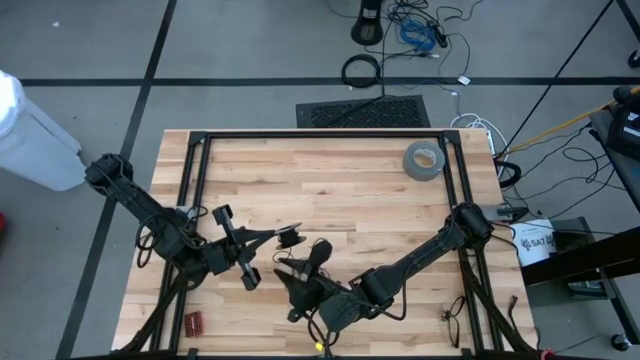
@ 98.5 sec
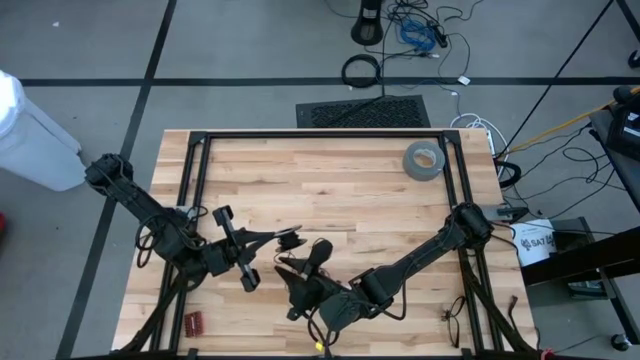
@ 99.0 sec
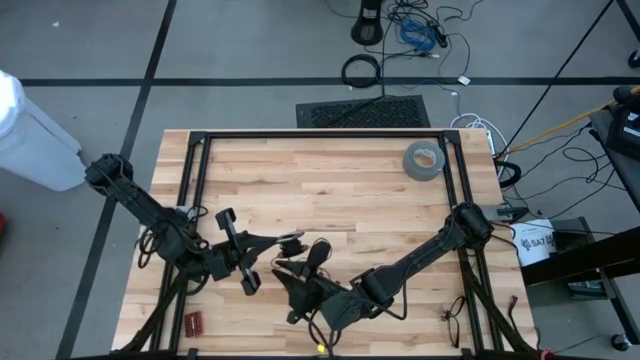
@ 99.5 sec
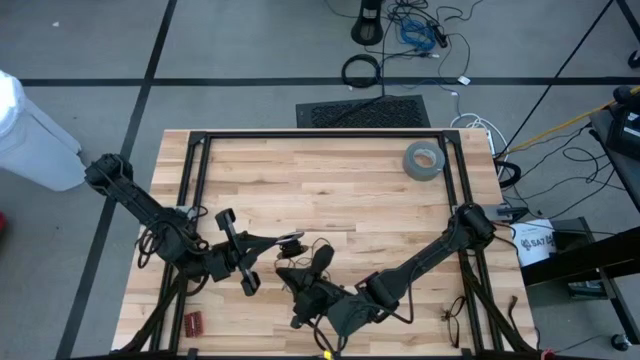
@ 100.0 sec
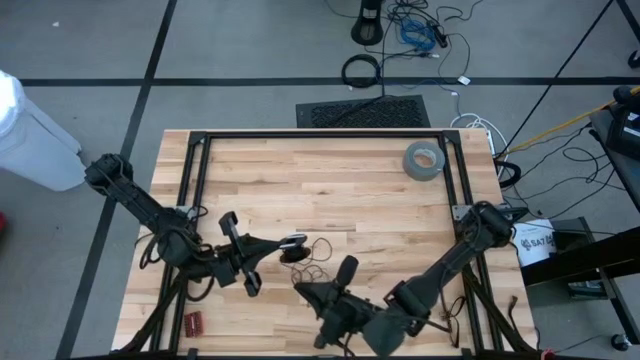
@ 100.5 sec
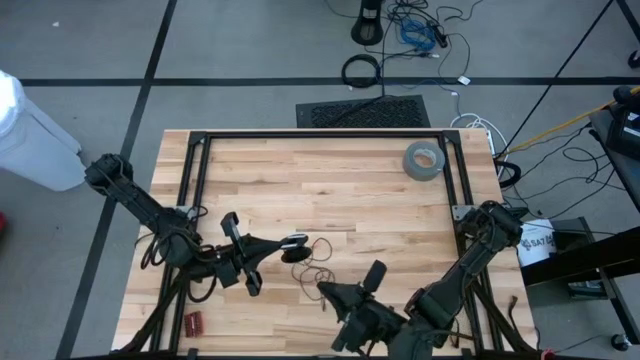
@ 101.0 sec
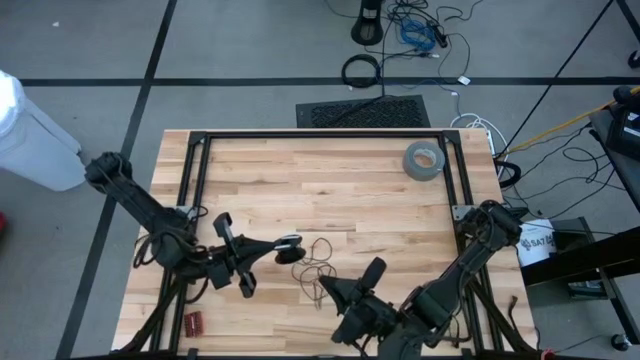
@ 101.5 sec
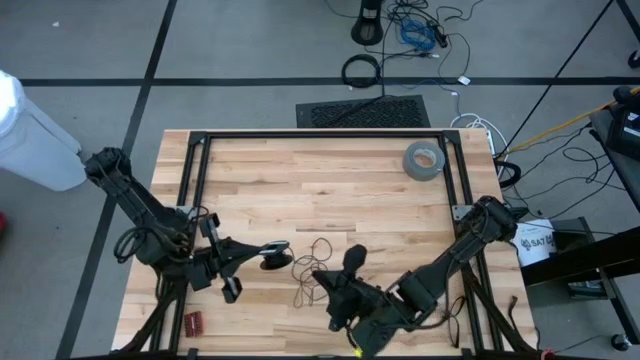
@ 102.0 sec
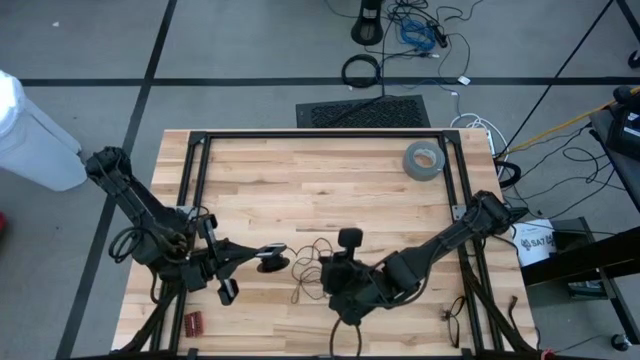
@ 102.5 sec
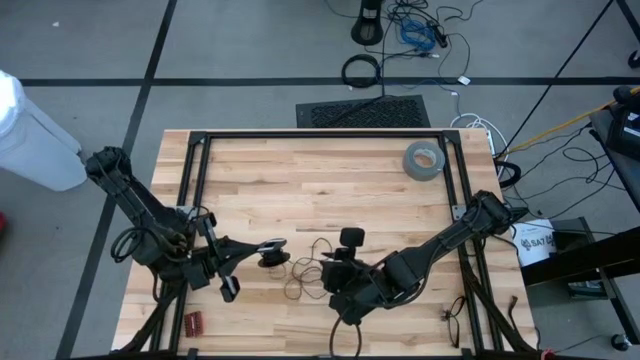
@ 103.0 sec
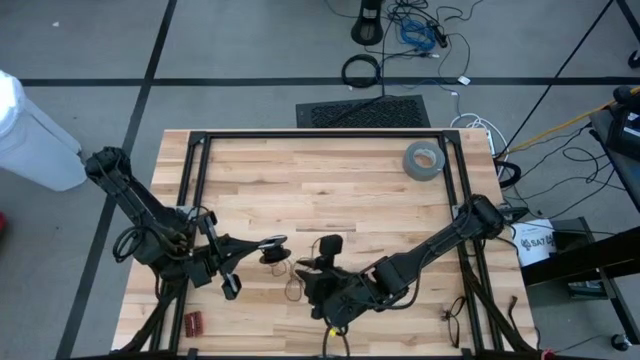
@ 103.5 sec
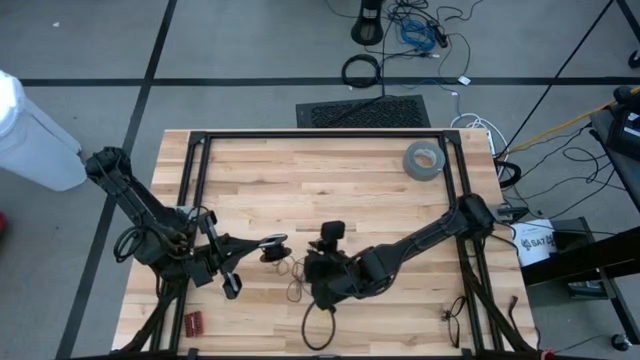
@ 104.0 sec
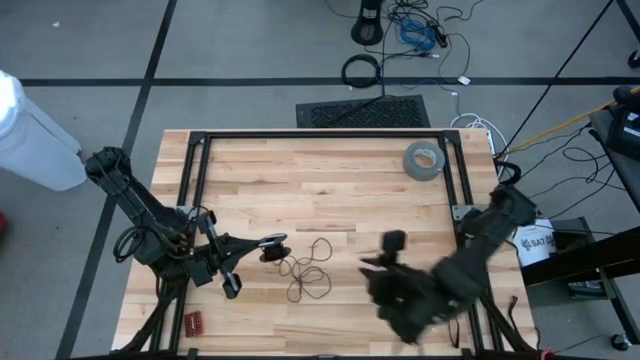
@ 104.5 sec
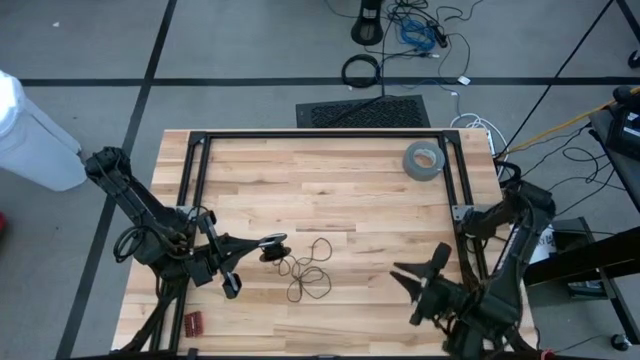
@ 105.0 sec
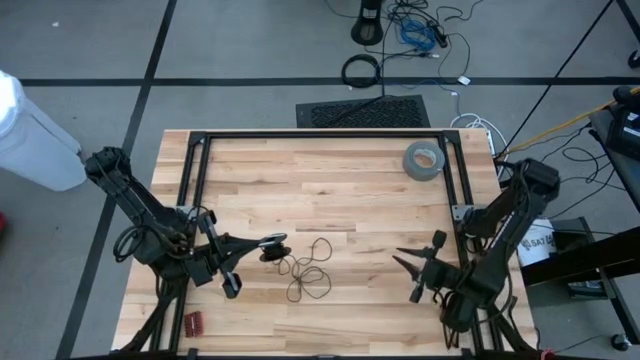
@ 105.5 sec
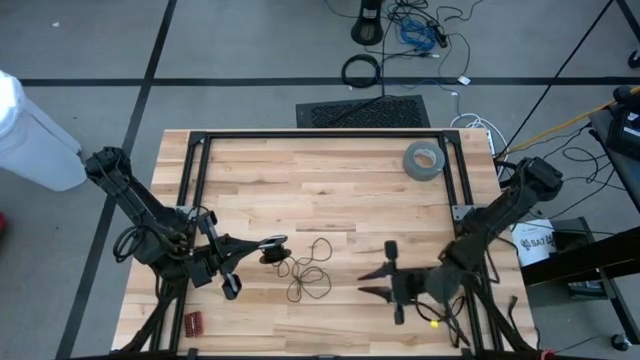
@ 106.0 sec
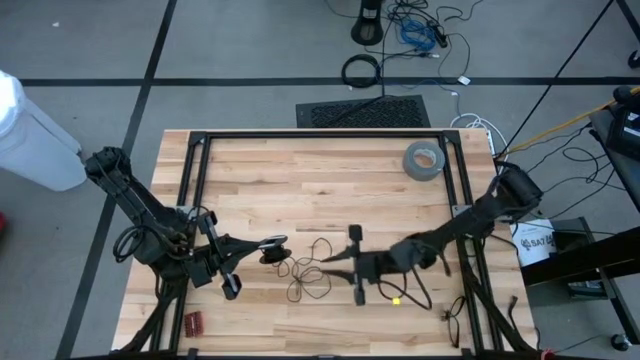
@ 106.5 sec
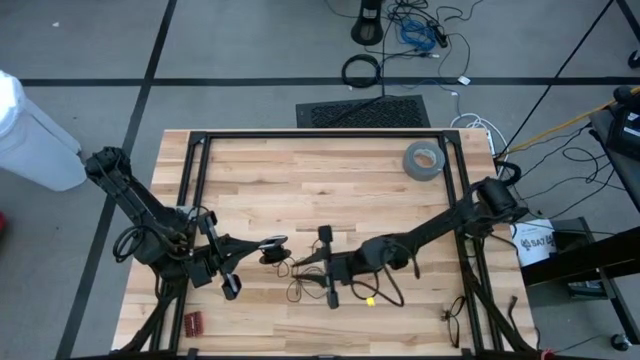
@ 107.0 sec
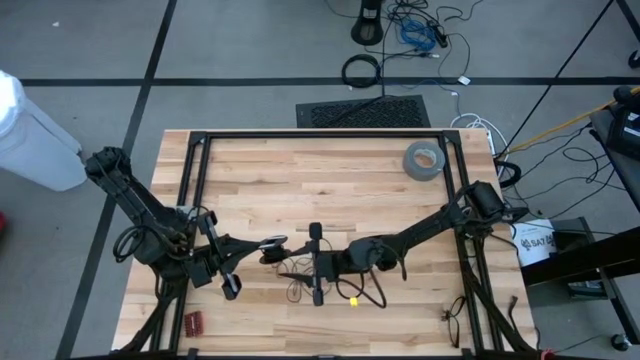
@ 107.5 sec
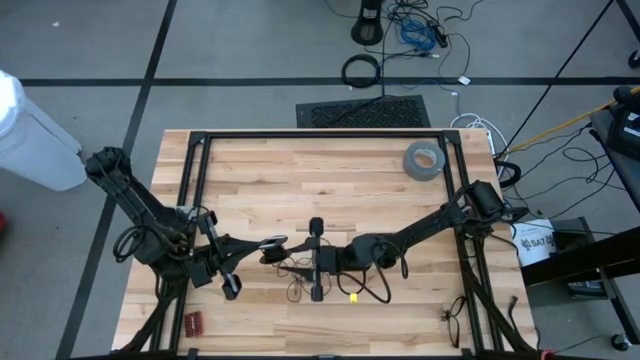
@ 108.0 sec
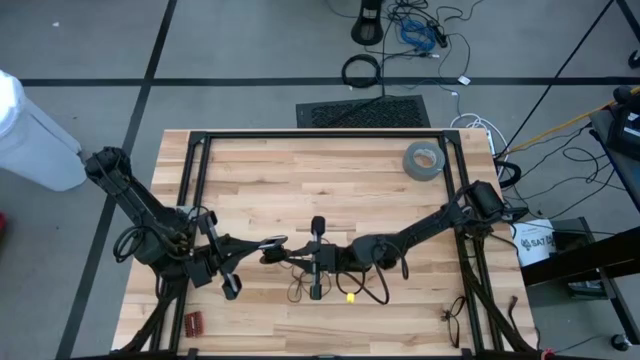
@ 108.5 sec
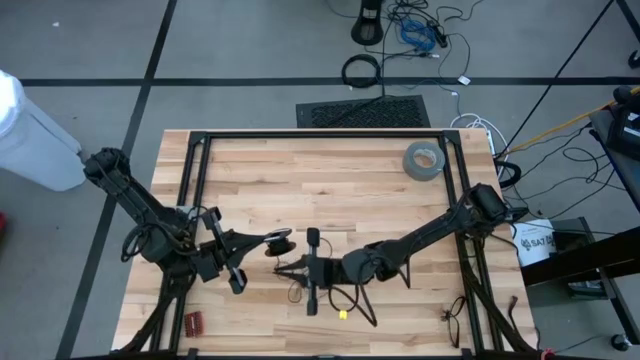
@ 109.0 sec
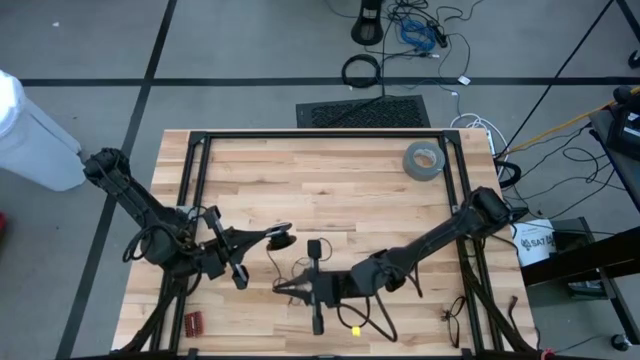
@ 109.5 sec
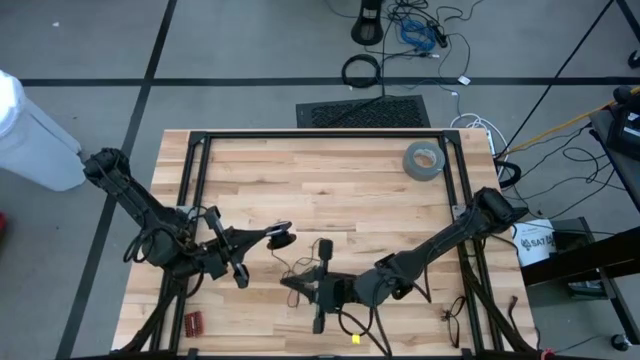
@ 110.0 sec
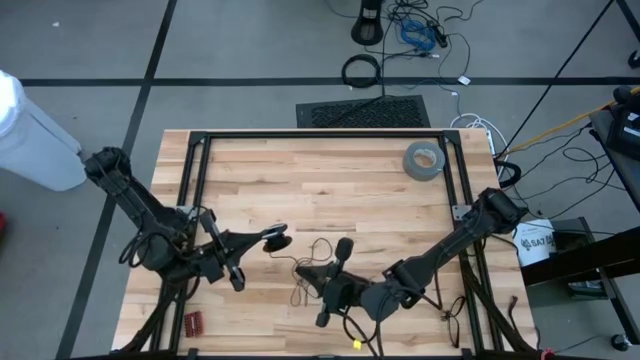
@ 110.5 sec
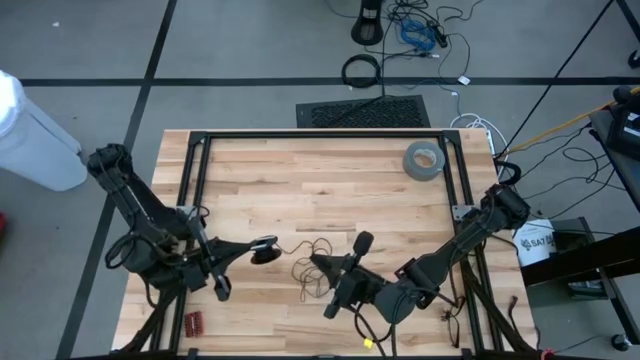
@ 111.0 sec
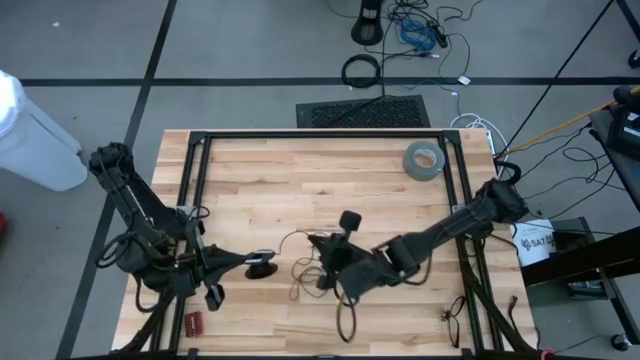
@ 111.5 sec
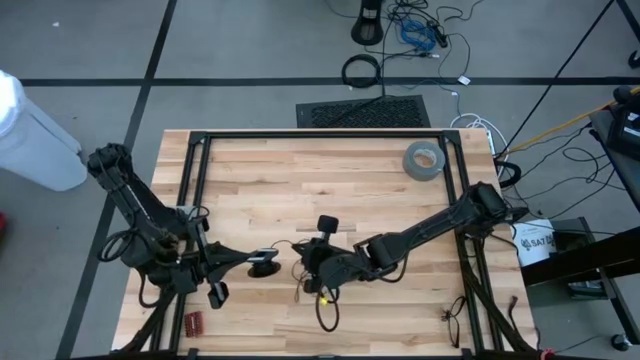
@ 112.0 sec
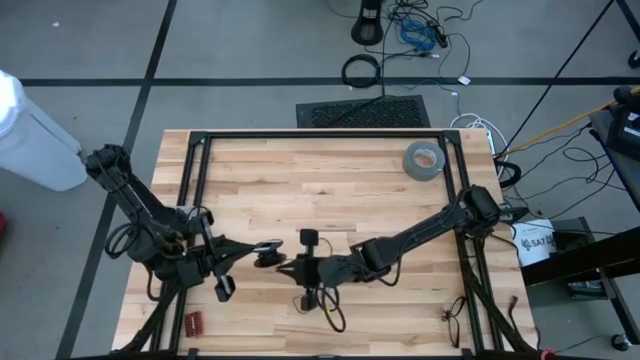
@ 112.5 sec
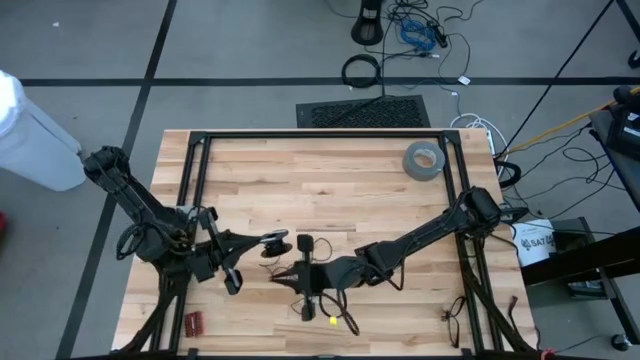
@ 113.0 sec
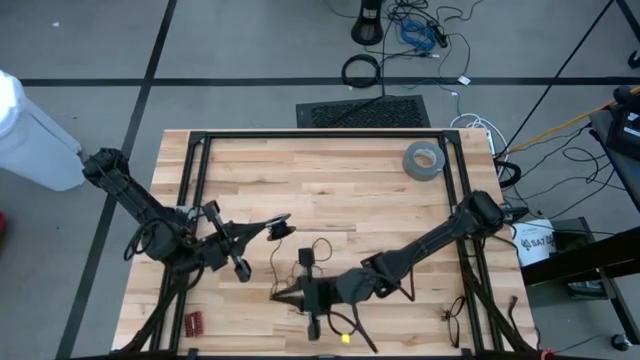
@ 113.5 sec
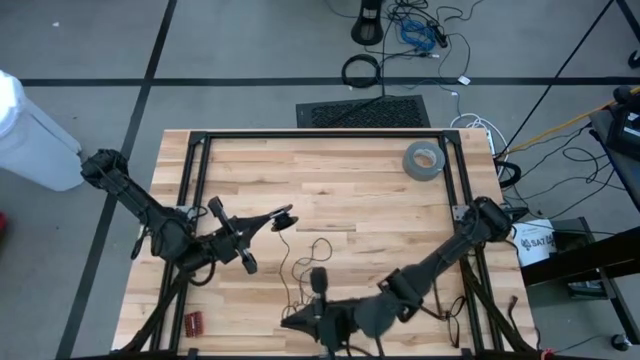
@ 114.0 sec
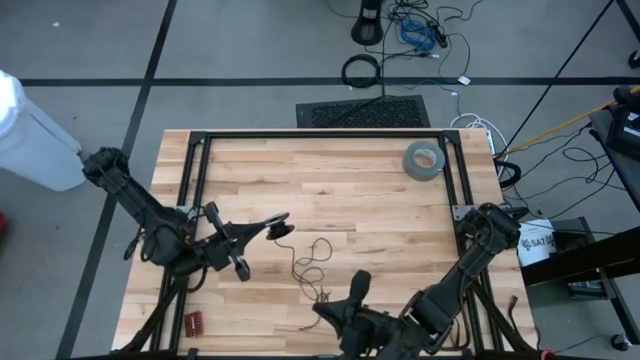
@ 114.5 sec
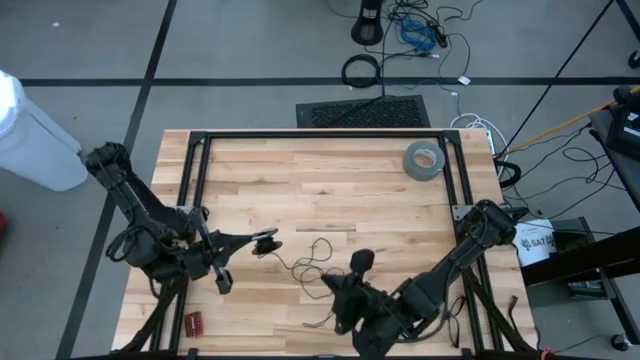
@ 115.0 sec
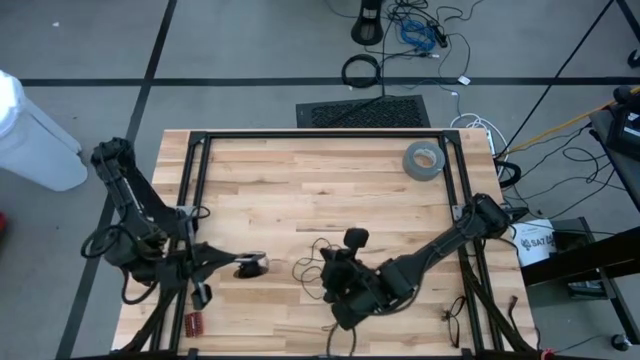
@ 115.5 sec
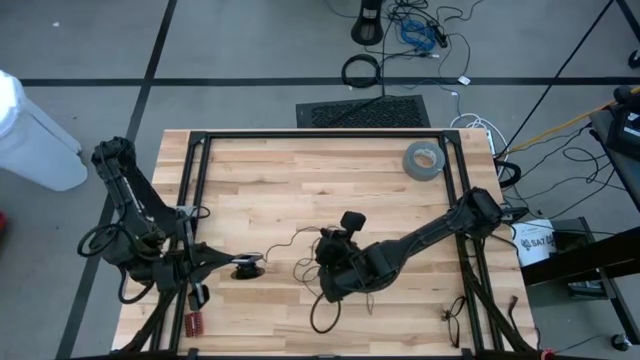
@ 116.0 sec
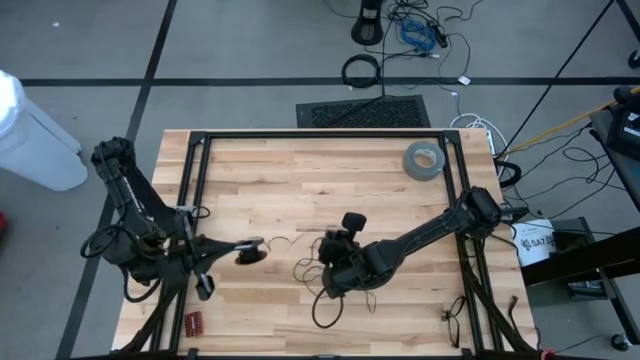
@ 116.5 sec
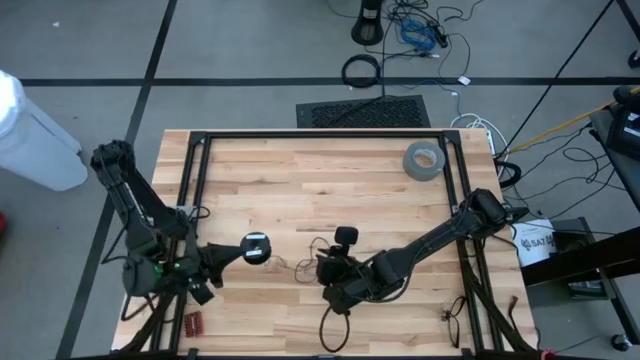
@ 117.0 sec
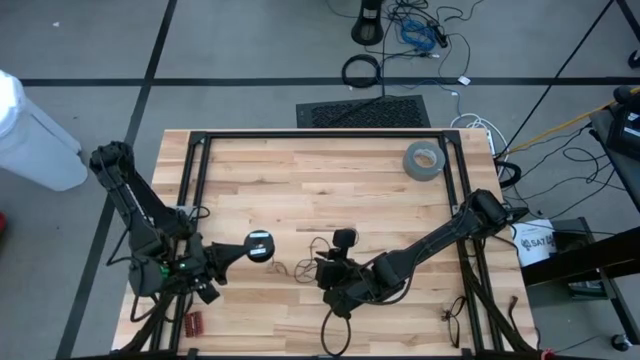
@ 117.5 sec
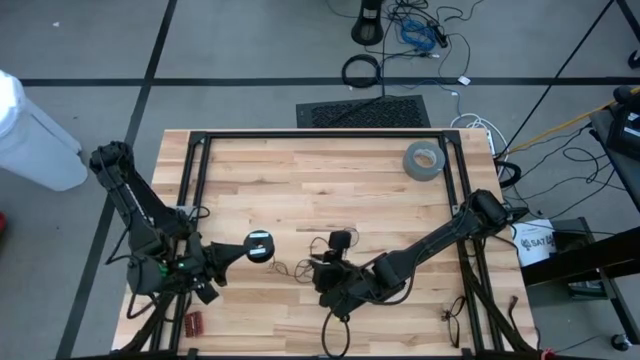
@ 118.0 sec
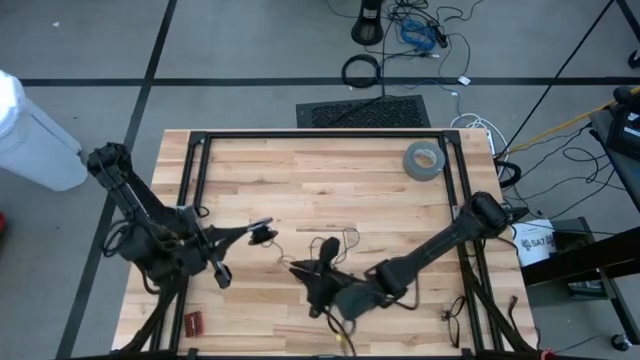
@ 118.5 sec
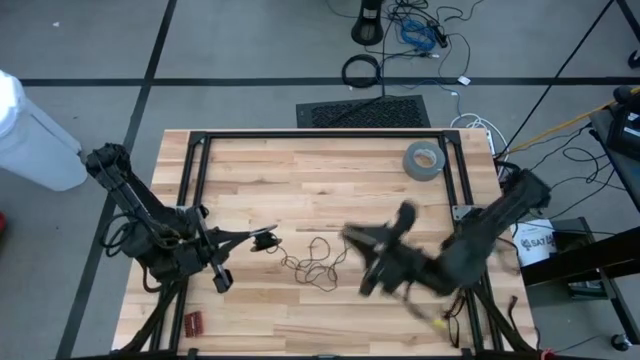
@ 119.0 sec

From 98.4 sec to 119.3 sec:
Task: Coil cords
Uncoil the black wire from the spool
